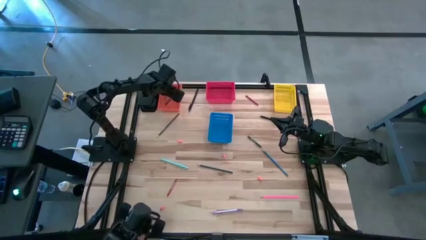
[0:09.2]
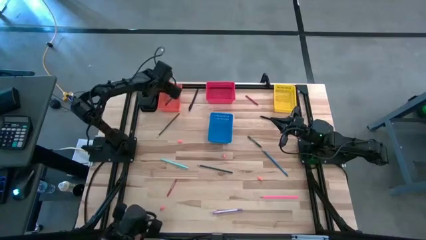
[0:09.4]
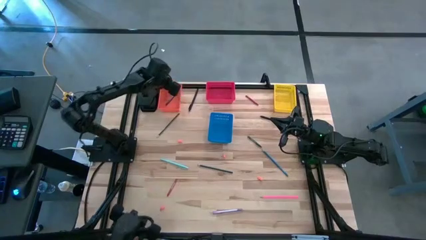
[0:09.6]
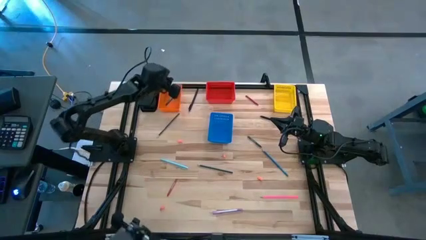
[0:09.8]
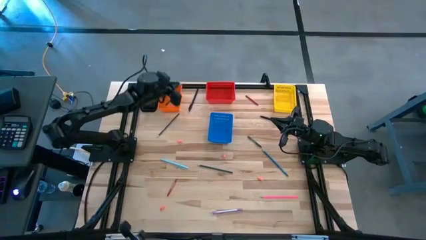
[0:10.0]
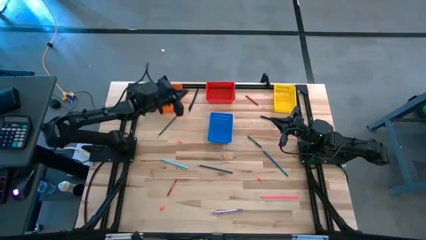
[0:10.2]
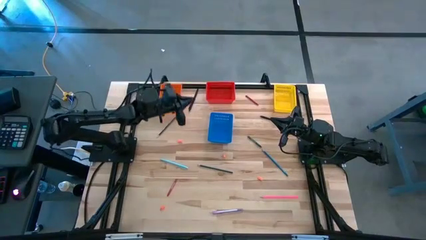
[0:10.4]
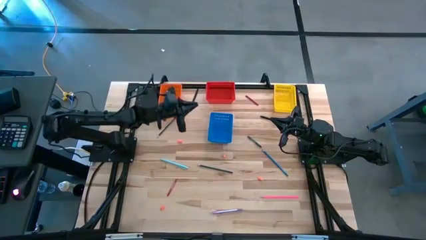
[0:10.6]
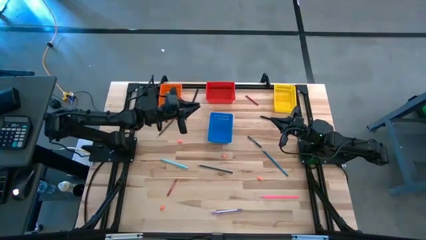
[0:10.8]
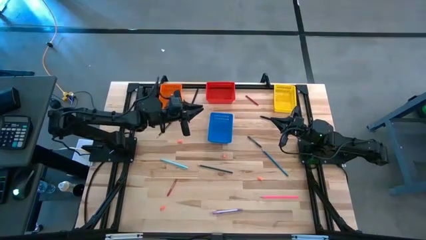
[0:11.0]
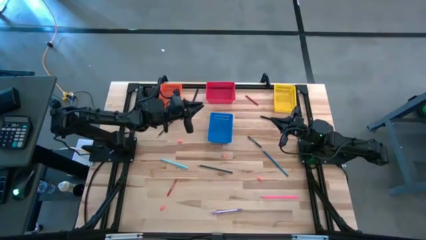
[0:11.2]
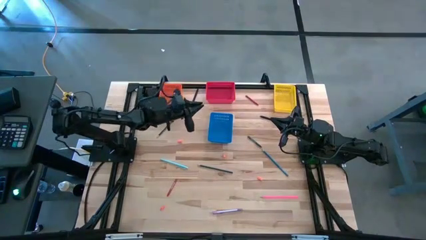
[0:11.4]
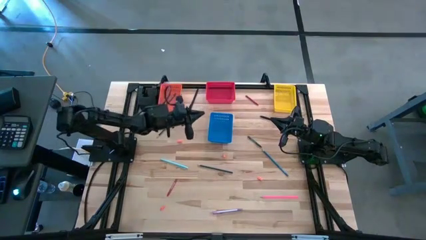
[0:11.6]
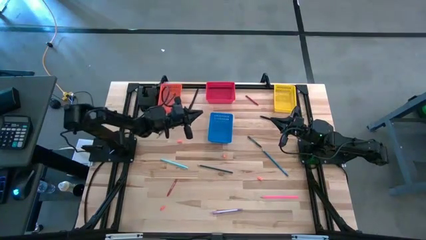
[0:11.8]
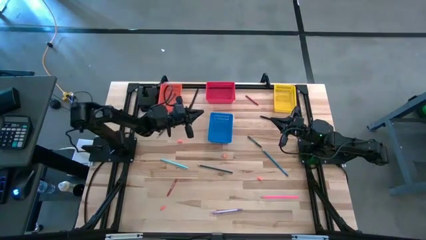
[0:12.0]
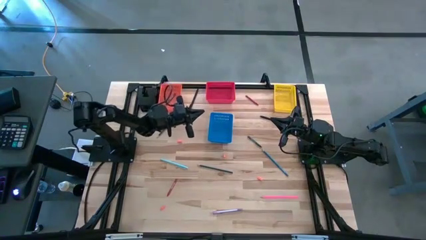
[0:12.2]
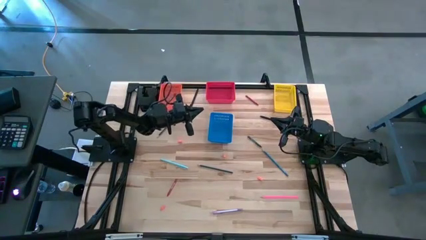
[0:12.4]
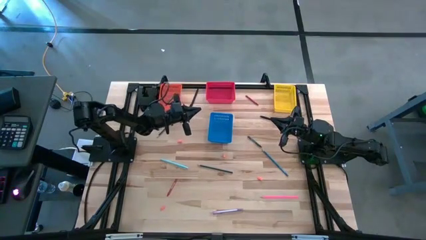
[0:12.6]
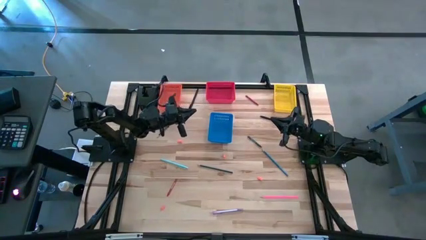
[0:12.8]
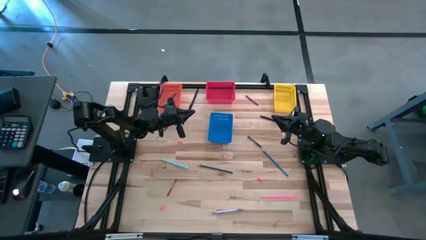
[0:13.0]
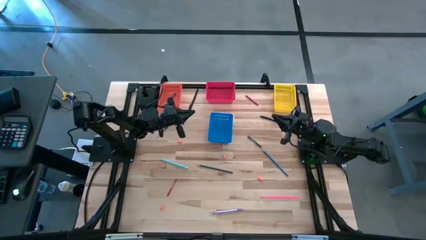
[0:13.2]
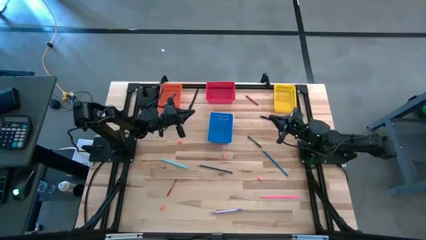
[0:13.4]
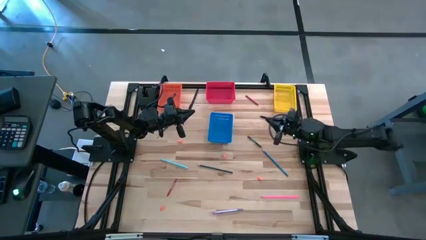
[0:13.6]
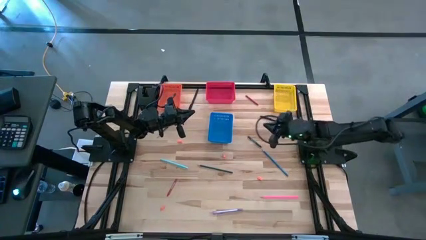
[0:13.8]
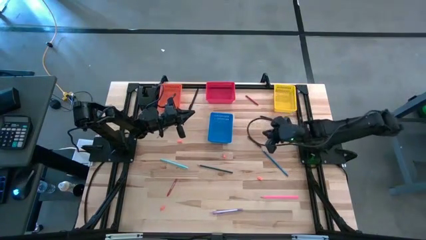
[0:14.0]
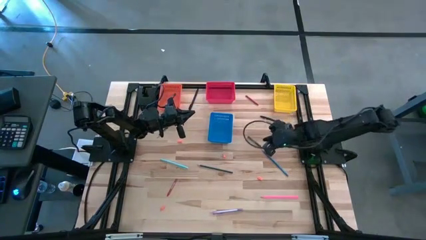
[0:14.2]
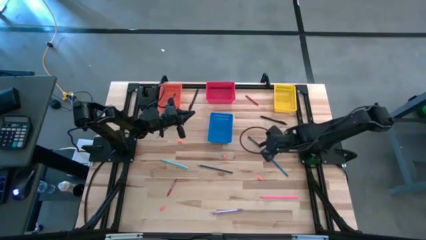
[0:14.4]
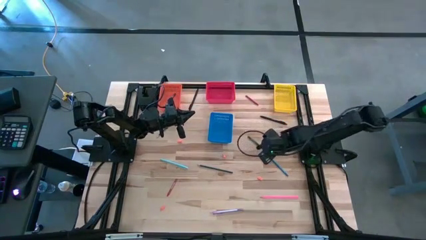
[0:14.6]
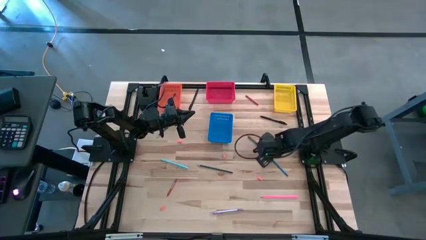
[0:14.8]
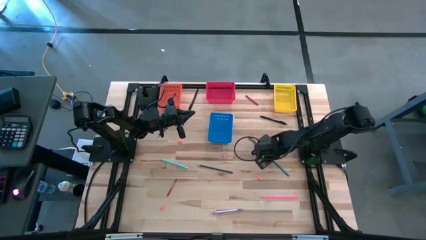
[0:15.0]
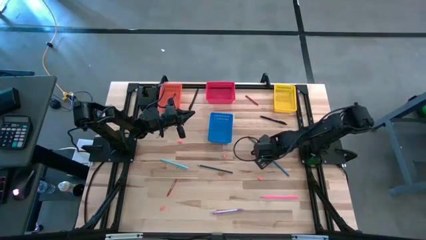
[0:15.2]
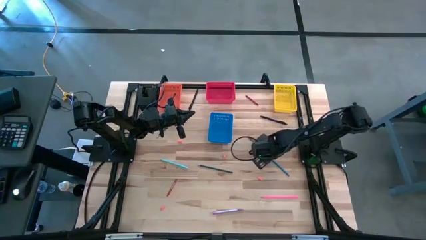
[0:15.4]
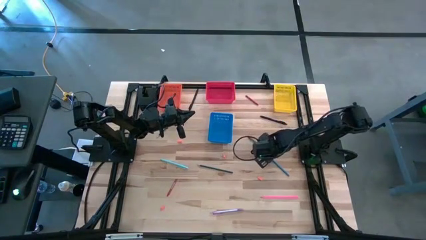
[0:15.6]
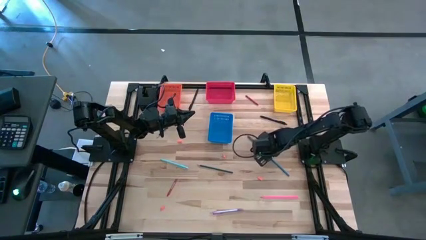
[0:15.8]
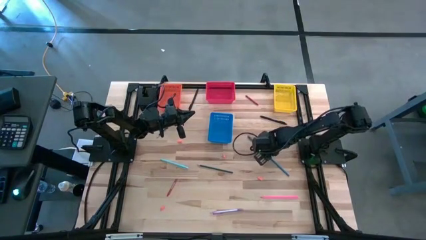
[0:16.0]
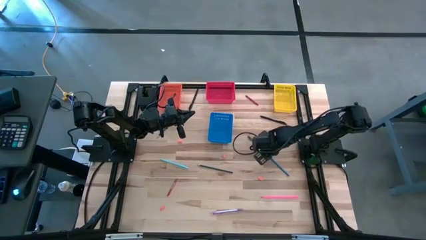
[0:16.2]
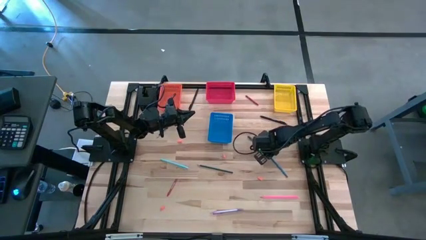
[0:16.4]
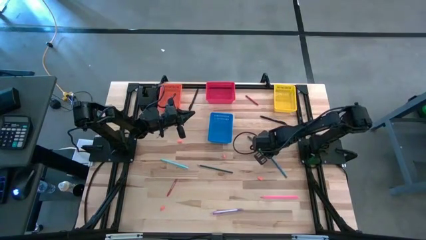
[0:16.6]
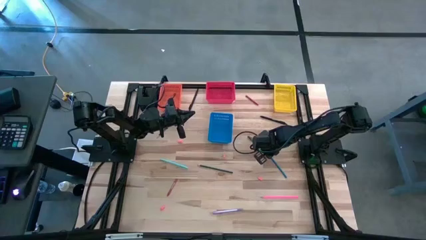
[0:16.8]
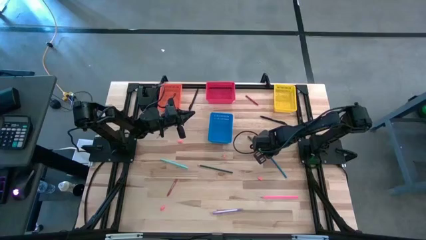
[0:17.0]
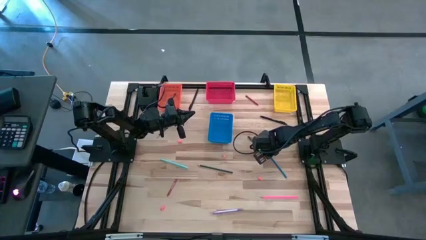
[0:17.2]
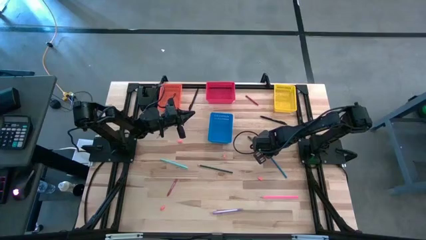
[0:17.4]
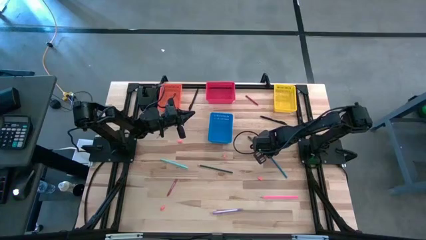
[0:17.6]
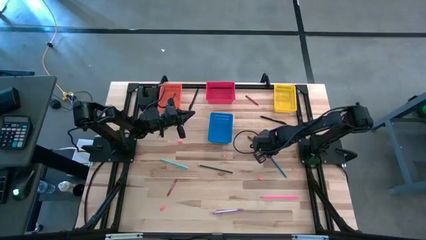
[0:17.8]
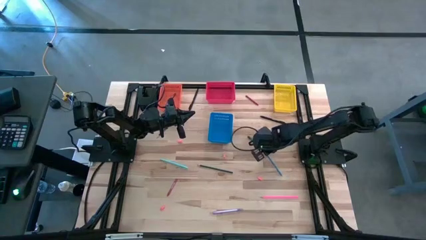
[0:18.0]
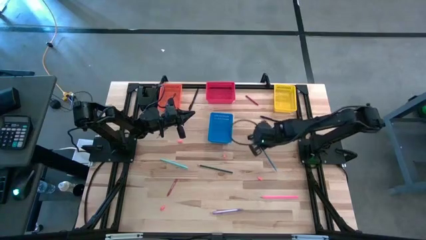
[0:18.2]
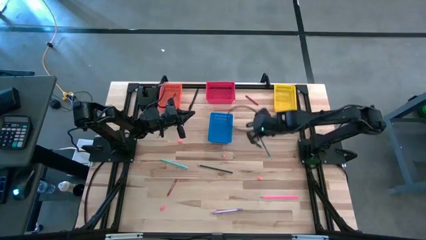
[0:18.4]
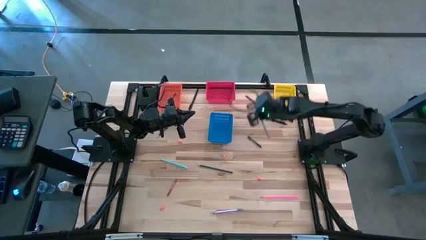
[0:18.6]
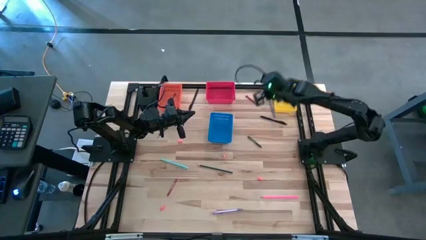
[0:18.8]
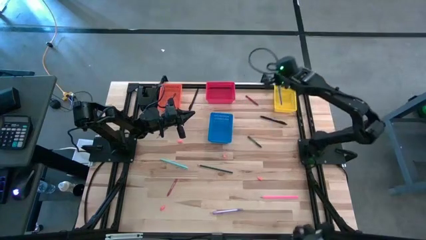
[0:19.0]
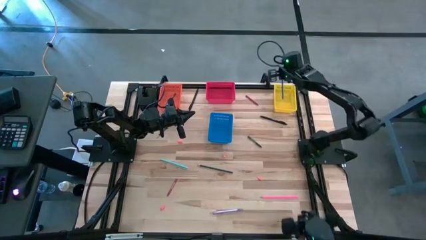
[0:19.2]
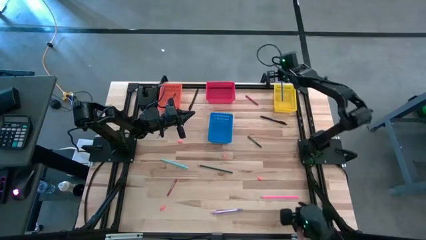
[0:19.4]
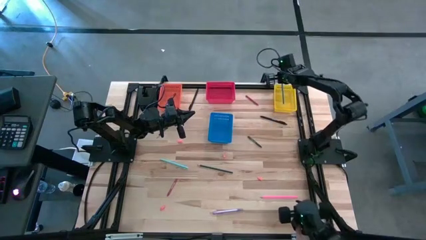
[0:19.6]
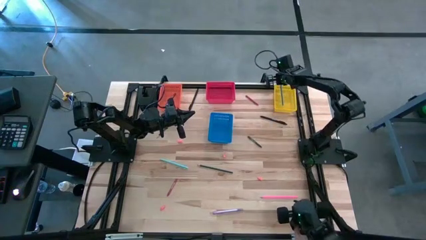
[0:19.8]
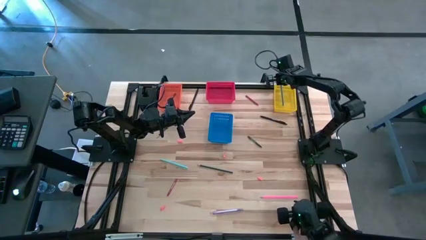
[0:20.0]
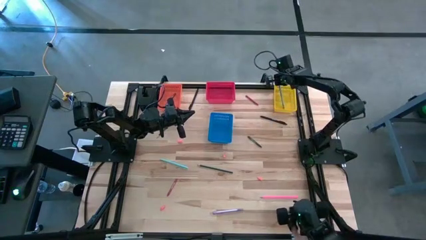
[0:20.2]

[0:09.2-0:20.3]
Task: Sort crayons/erasers/pens/pencils in bins
Put the blue pencil into the yellow bin

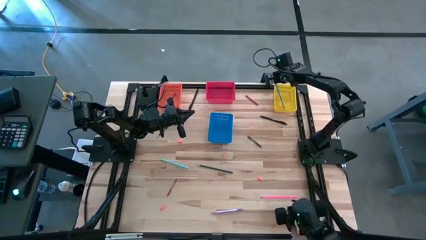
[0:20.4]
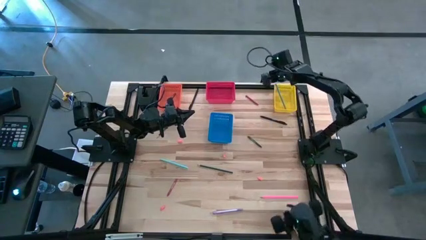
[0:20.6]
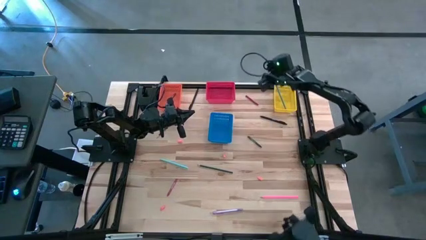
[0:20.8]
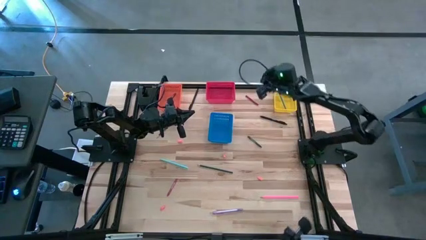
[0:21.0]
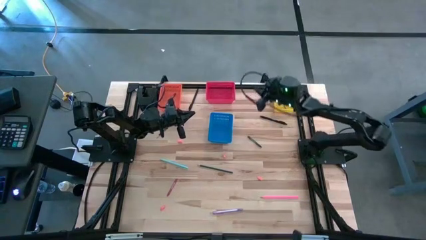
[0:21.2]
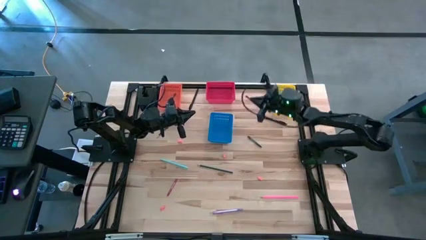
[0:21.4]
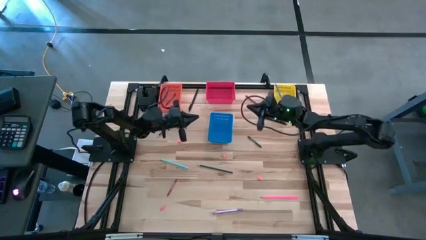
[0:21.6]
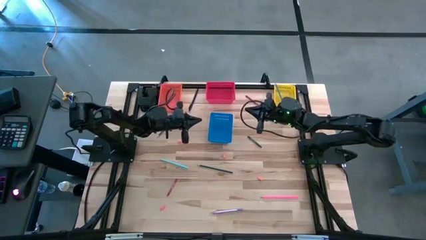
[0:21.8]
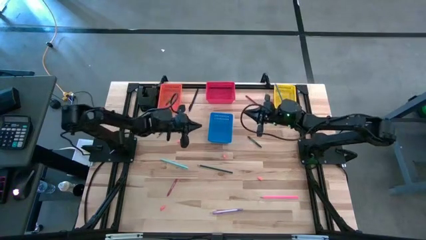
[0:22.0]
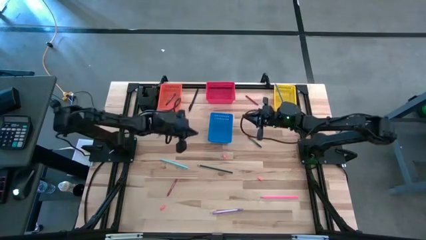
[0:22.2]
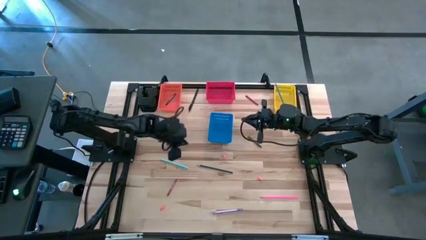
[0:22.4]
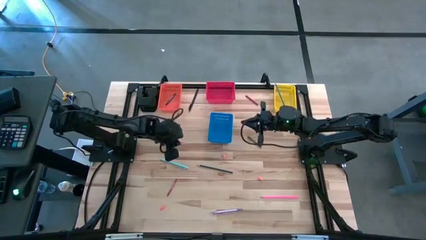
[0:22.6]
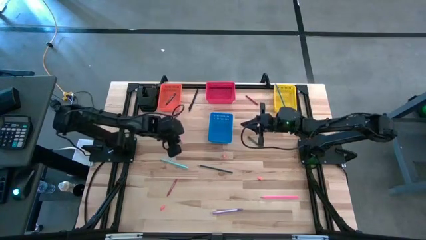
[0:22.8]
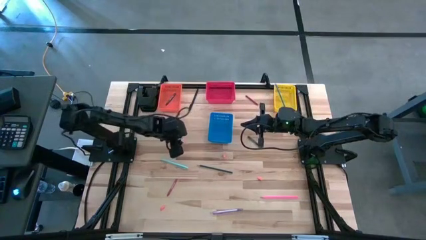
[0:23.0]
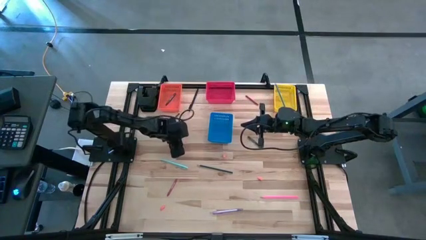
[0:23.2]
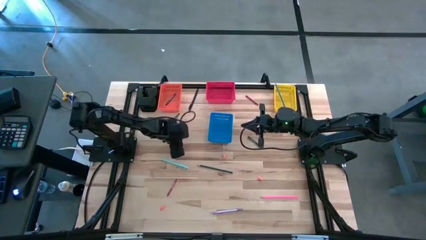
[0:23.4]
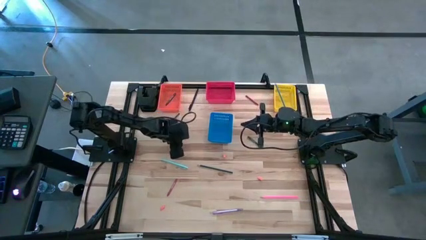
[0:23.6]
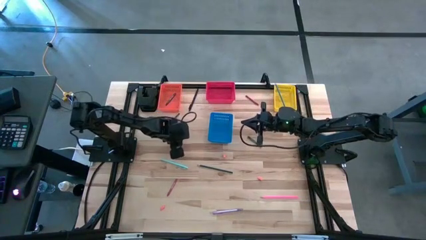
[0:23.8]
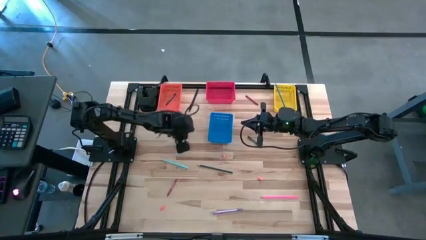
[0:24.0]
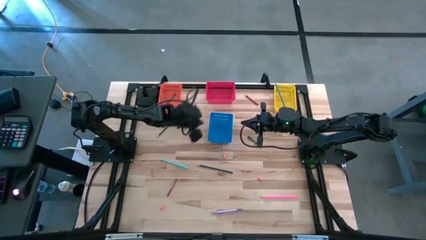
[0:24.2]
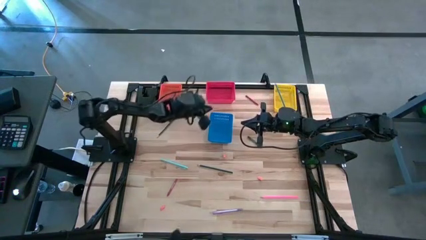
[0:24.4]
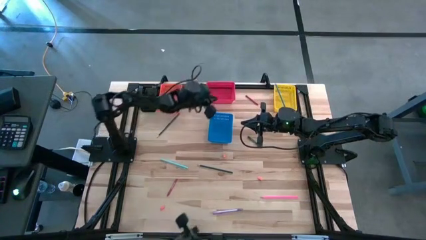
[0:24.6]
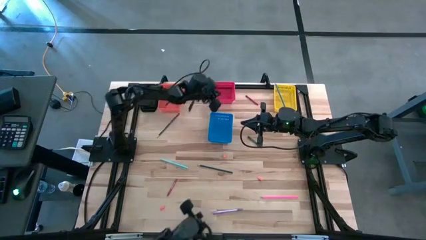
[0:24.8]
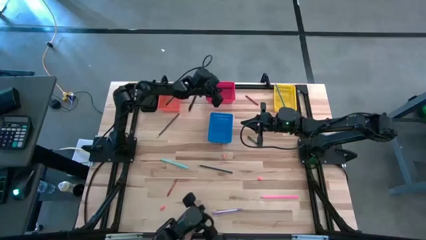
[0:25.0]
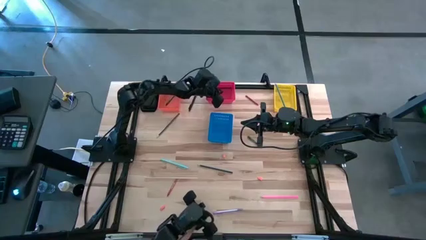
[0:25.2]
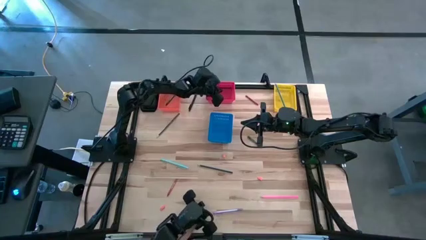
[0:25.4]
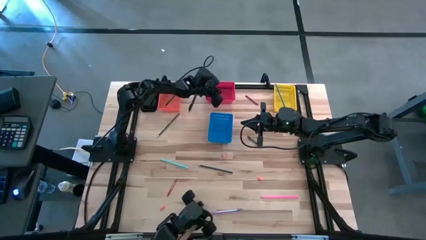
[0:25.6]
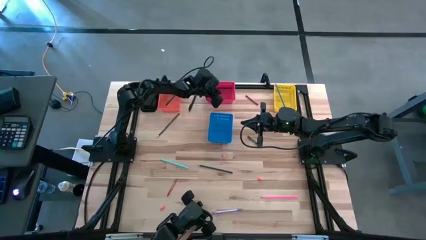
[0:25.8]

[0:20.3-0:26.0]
Put the orange eraser into the red bin

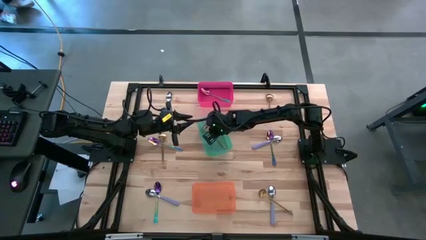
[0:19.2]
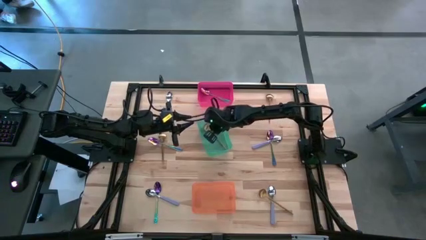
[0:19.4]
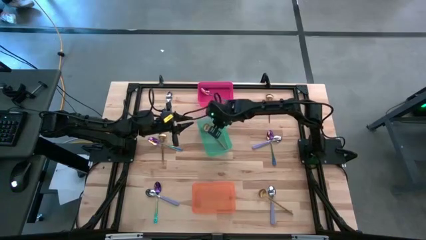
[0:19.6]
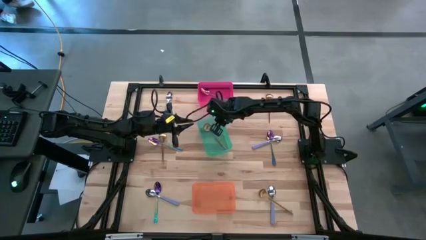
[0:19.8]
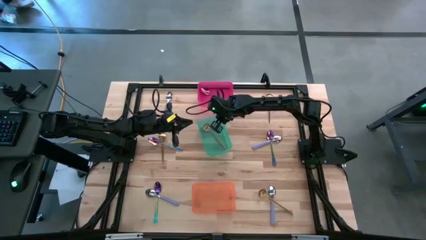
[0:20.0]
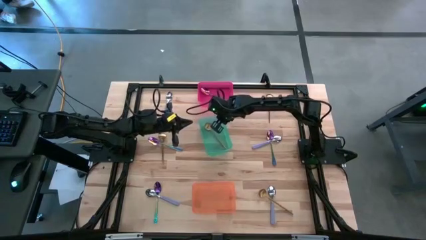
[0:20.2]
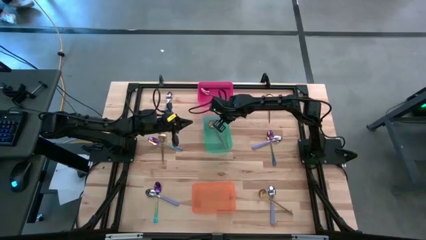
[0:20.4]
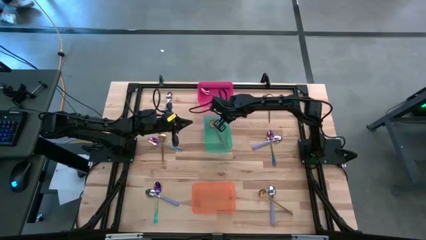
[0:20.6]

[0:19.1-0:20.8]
Task: Sort silverware by color (type)
Adjust the blue bin on the table
